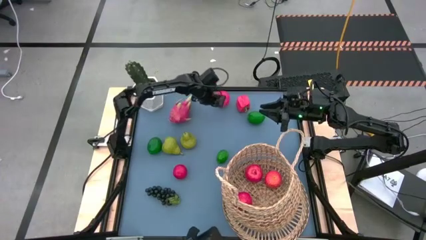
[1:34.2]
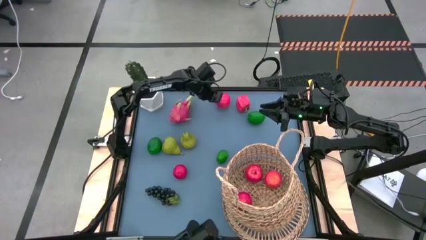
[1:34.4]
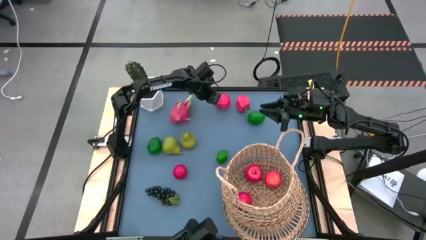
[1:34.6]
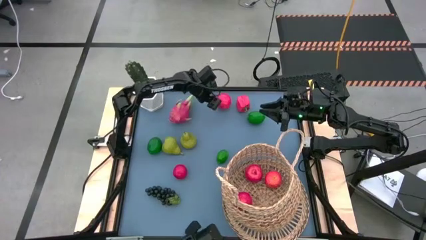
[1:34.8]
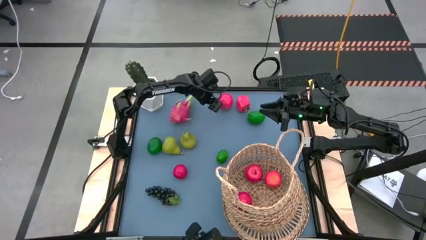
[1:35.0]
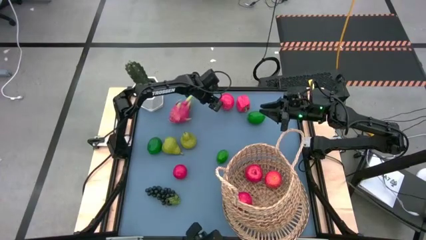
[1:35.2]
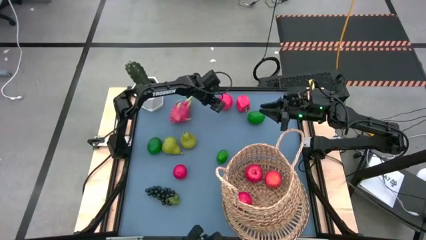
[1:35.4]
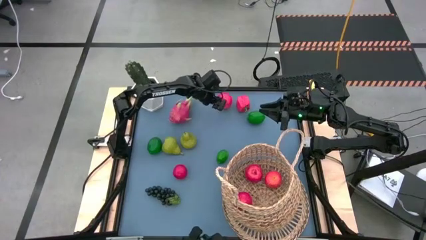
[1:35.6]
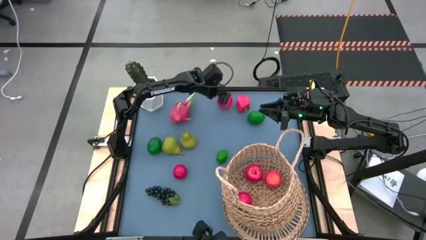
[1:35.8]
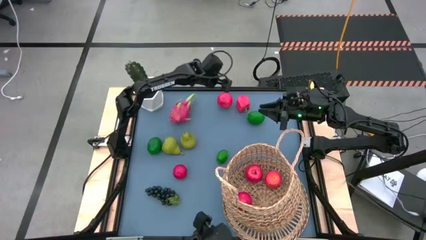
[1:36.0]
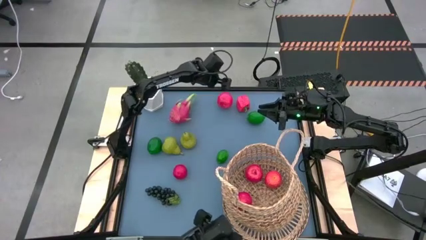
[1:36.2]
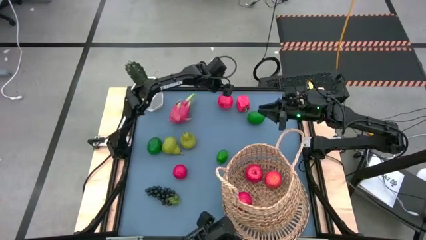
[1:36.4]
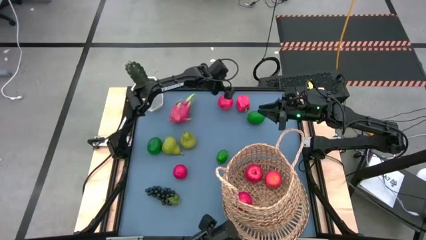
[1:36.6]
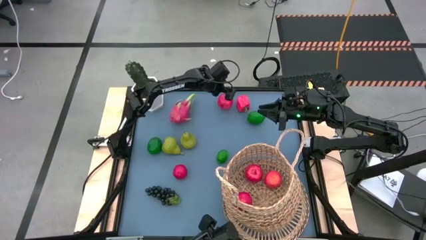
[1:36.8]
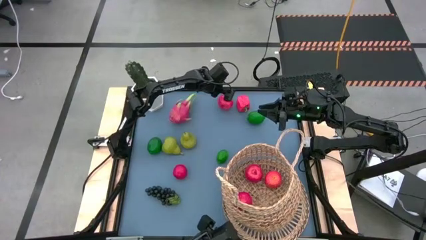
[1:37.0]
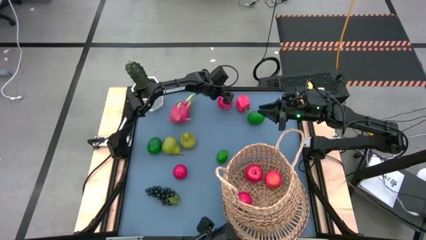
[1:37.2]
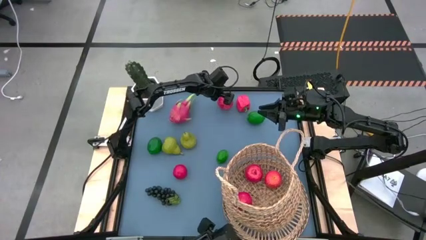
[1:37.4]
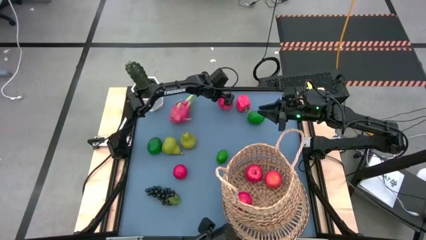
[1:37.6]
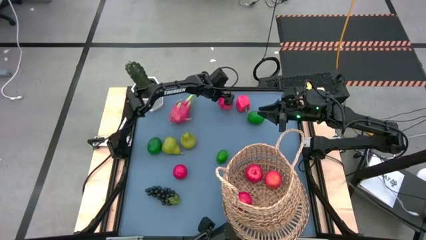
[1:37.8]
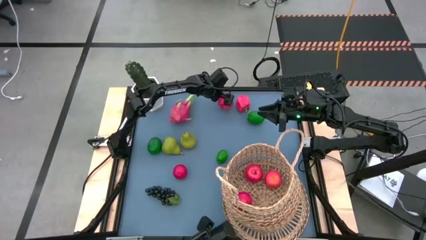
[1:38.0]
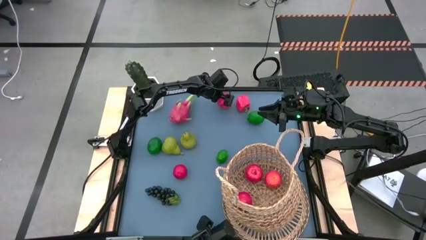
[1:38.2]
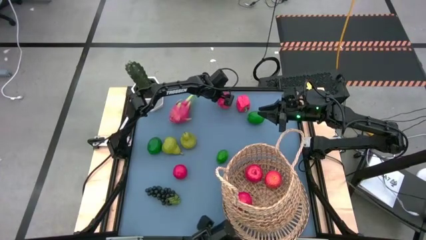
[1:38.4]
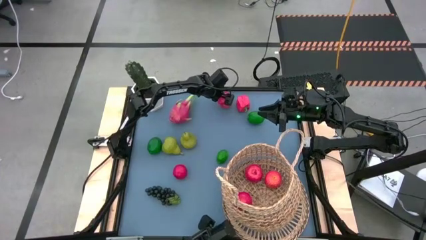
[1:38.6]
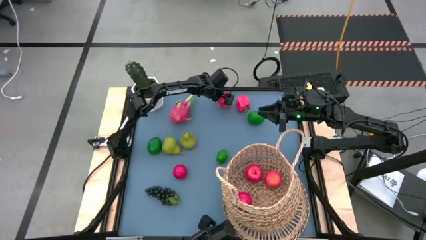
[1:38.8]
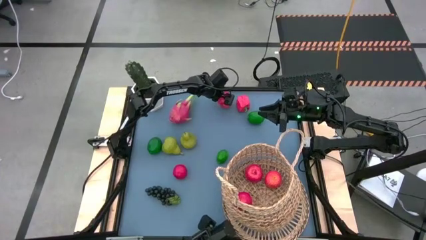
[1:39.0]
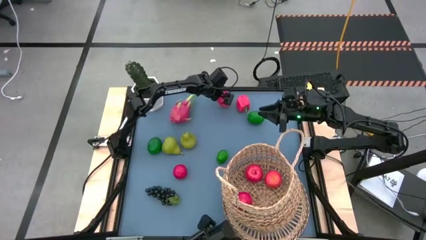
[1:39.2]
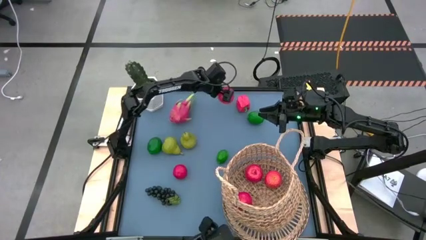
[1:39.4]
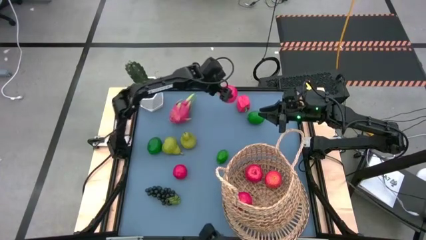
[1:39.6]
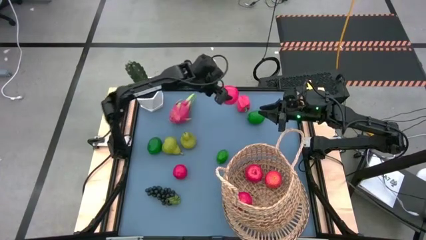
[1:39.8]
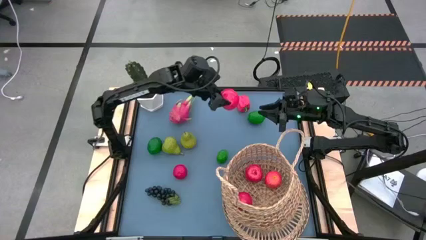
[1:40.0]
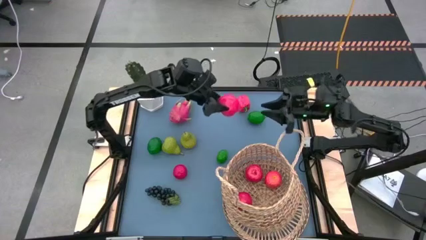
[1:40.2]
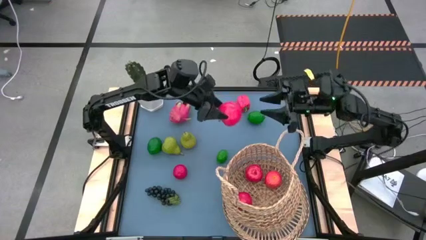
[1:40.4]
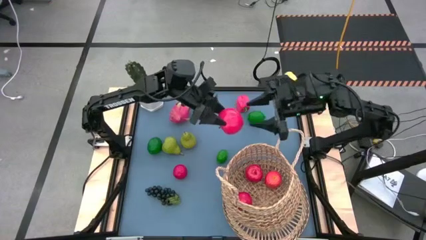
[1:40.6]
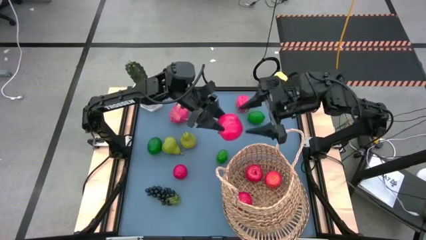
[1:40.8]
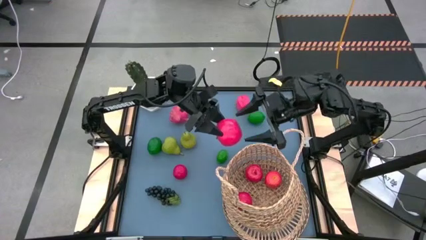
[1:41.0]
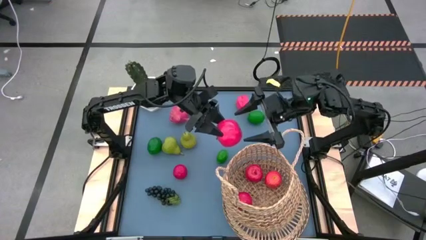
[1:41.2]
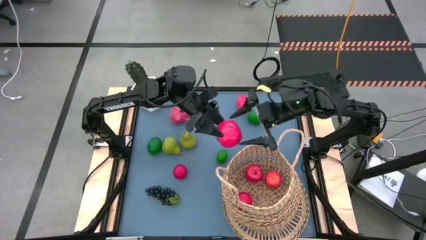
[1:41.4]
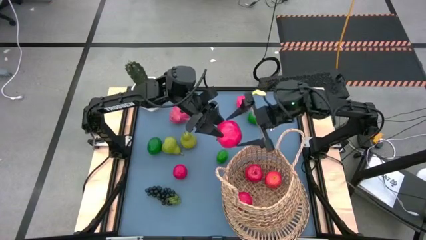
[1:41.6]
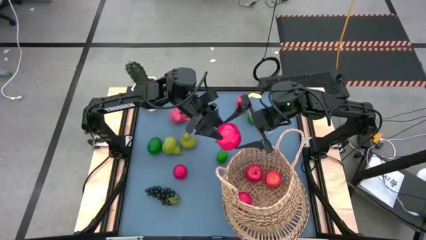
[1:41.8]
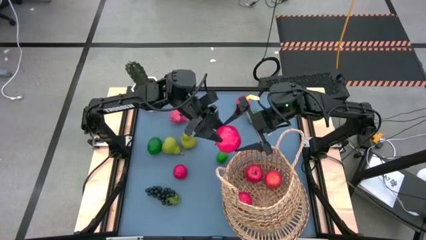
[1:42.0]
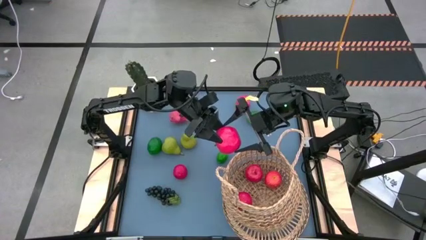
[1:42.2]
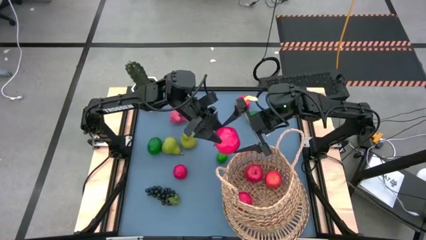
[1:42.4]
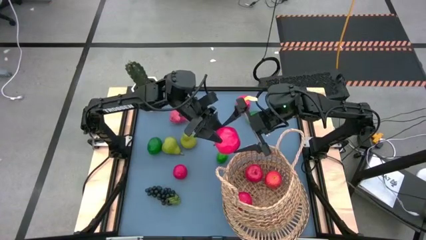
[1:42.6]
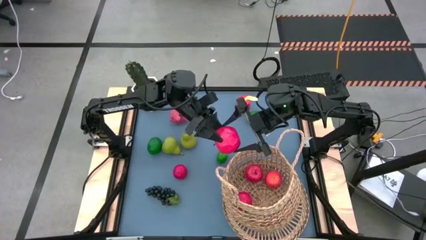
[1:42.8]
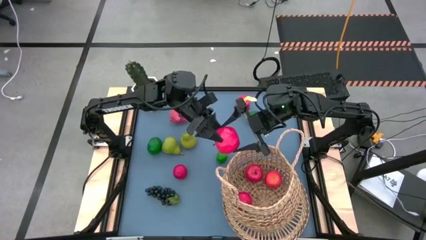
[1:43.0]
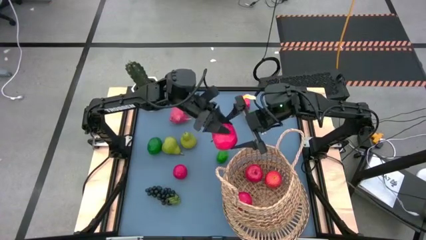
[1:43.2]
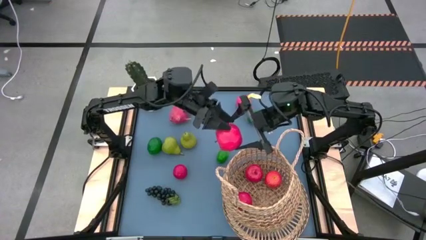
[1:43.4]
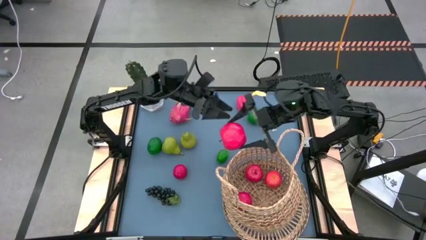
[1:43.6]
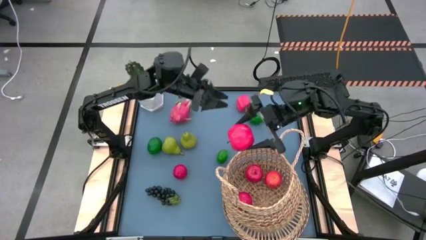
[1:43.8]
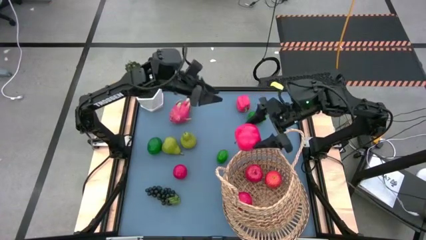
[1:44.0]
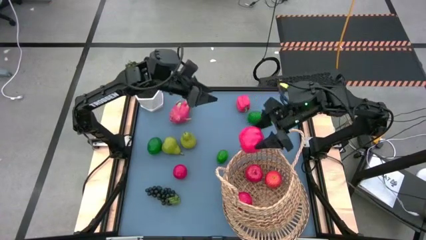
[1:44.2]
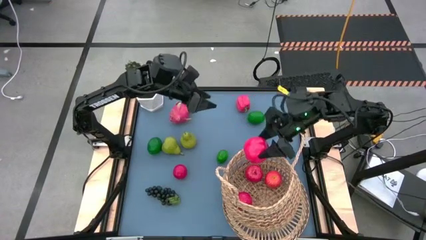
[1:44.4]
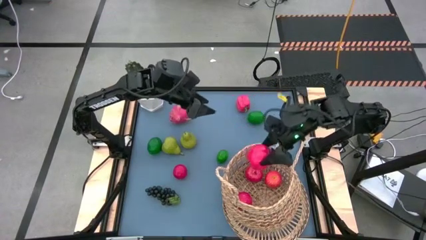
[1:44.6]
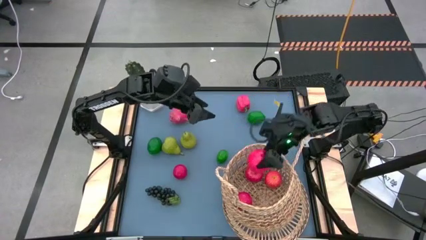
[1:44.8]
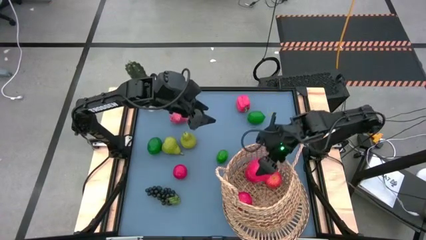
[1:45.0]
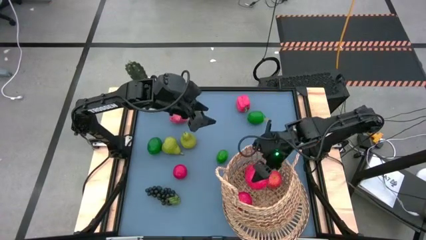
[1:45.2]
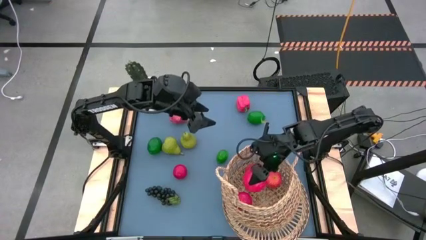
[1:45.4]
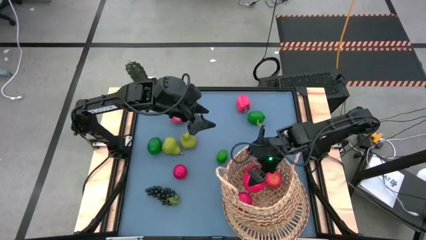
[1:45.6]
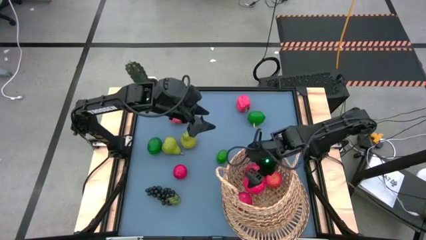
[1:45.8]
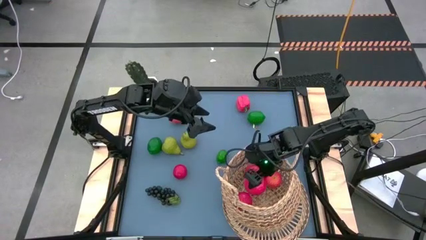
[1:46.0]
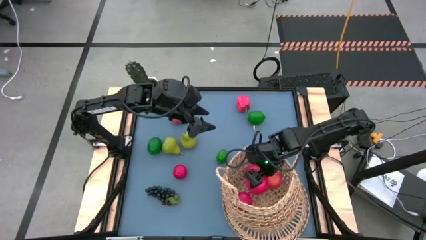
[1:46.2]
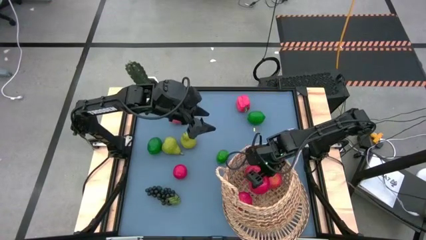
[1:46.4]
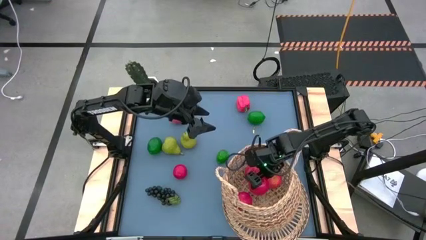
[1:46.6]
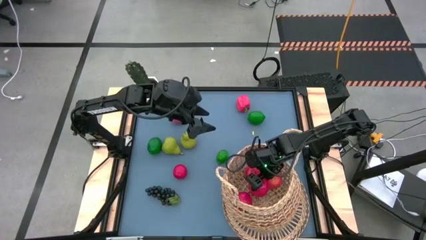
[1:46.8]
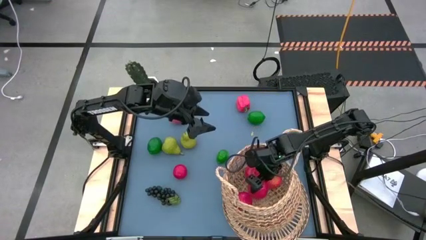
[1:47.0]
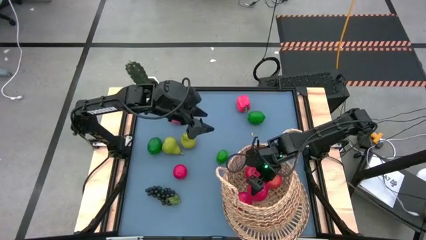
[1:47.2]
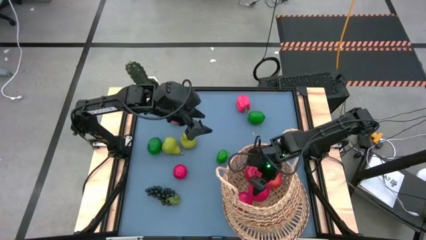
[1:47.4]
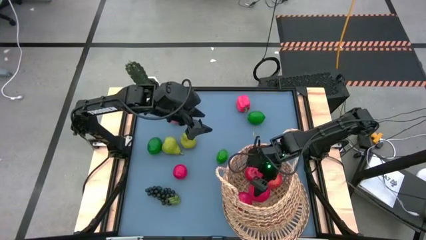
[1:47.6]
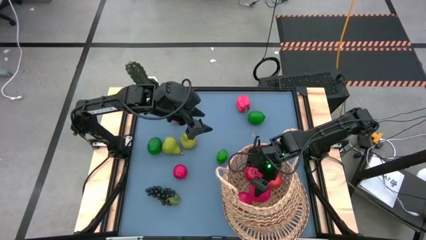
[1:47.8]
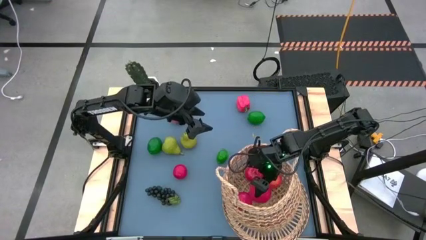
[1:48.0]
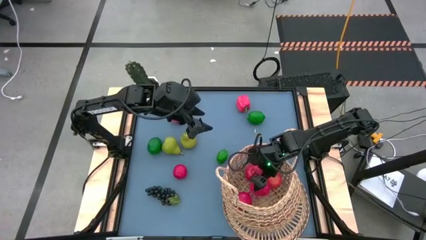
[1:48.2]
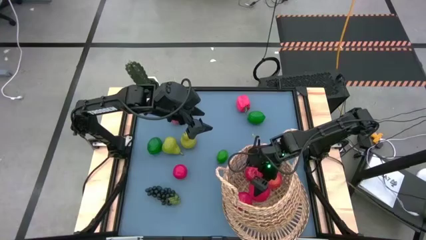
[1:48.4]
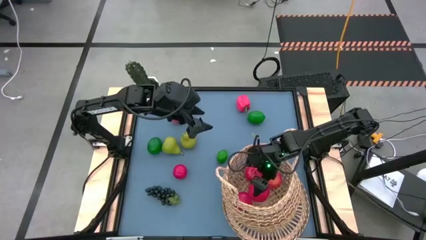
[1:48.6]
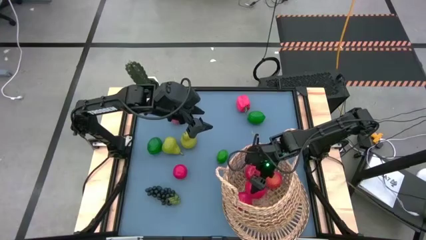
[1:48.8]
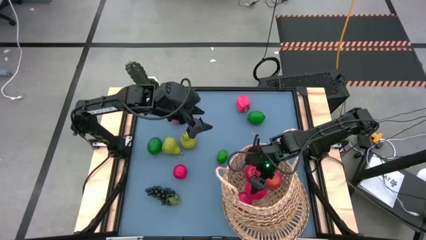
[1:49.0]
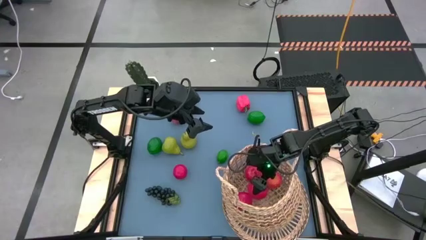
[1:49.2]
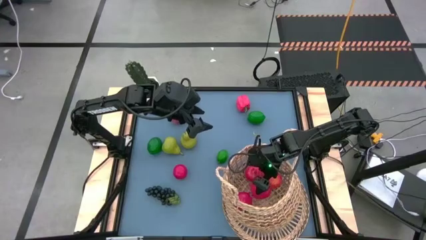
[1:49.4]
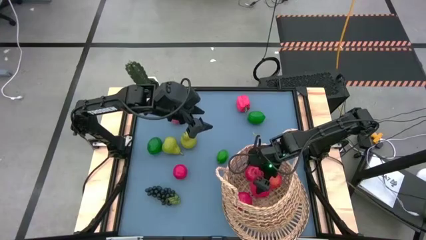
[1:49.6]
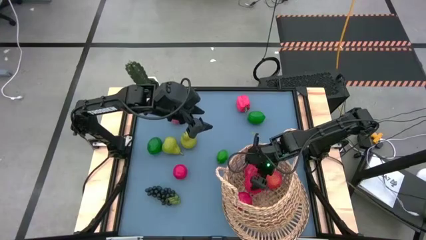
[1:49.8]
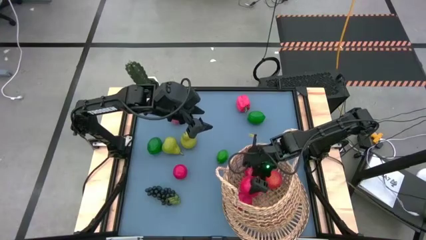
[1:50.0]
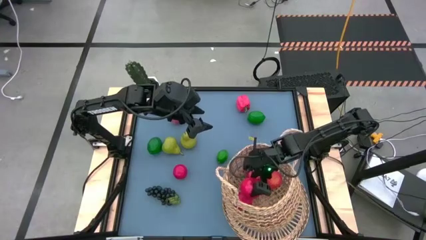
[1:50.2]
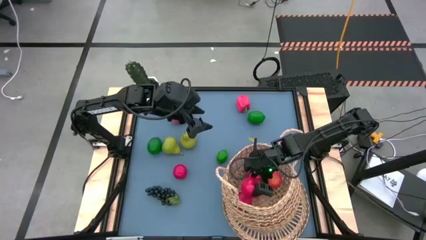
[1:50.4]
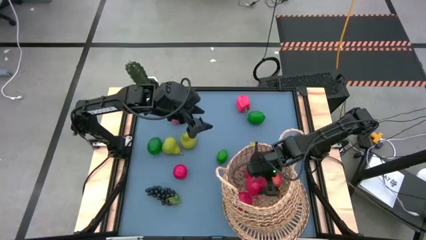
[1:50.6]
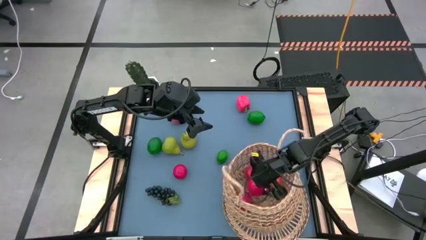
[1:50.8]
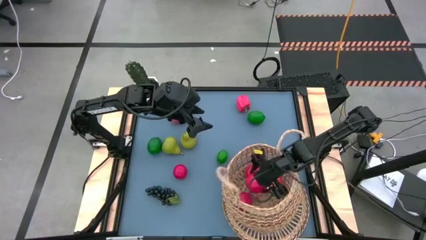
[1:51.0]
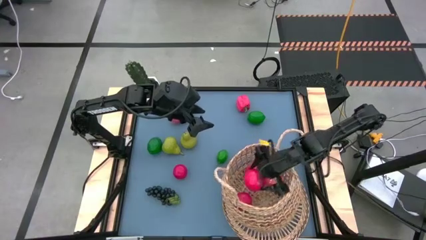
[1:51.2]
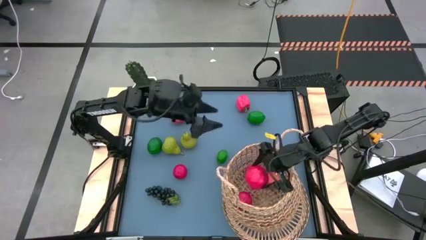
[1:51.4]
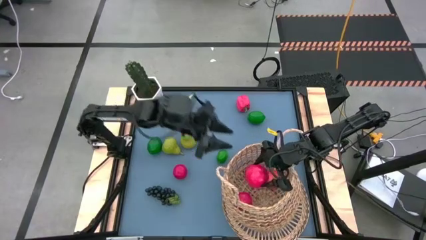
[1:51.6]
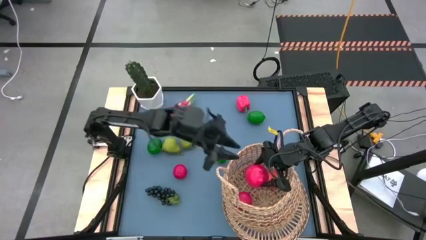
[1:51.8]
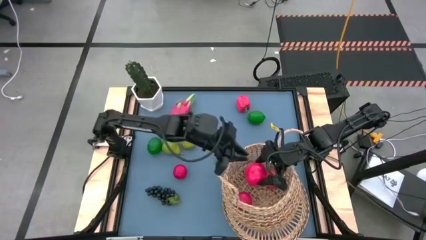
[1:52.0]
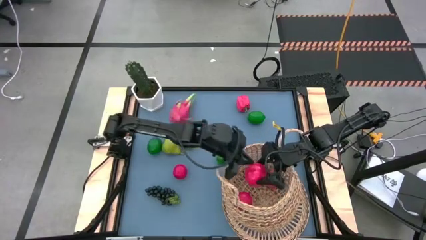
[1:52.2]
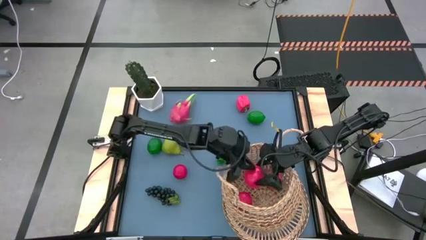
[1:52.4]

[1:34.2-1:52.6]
Task: Build produce basket
Put the red apple into the brown basket
